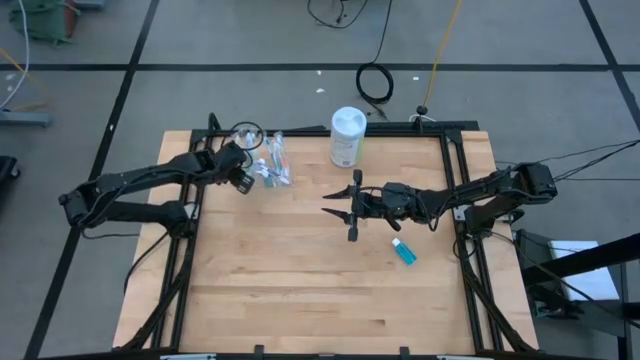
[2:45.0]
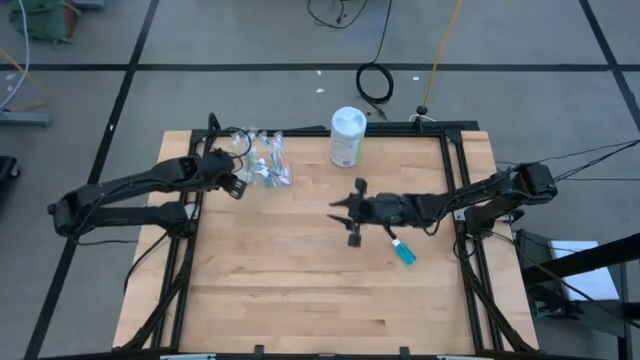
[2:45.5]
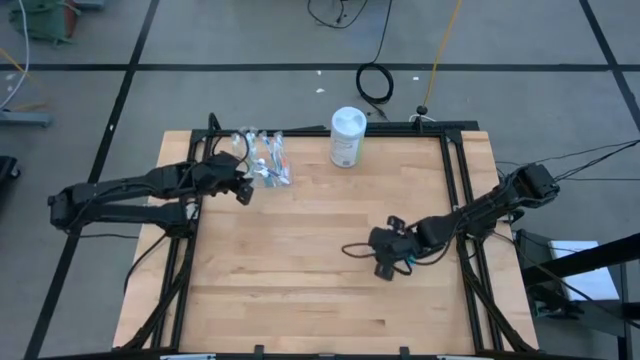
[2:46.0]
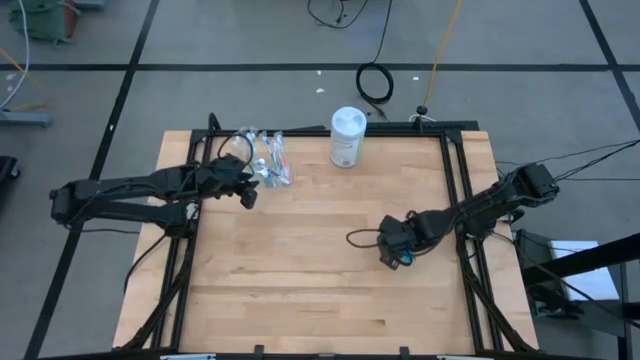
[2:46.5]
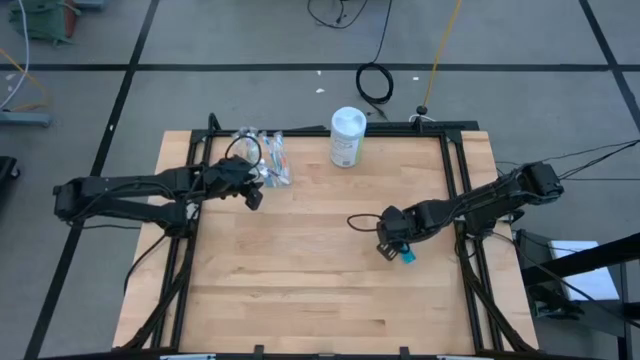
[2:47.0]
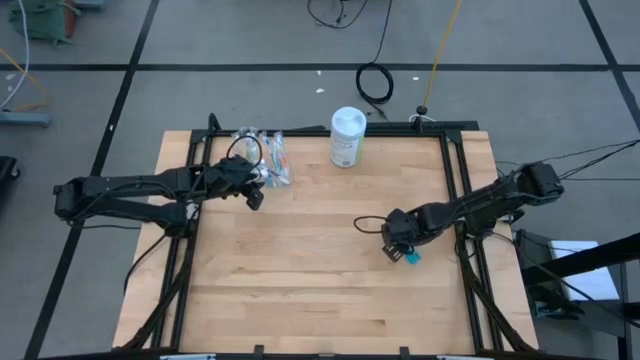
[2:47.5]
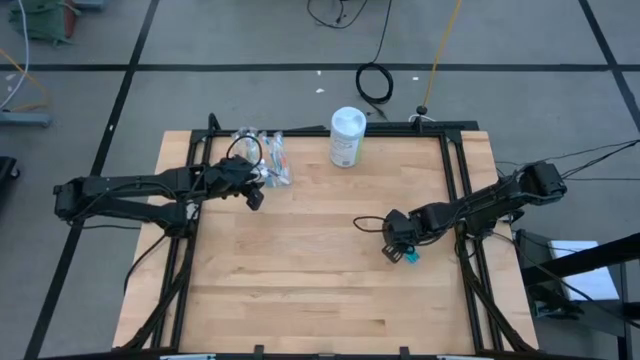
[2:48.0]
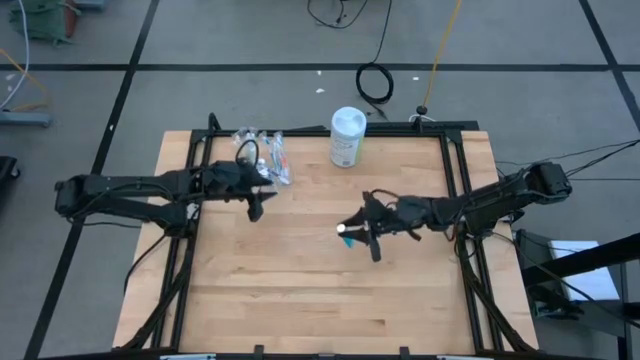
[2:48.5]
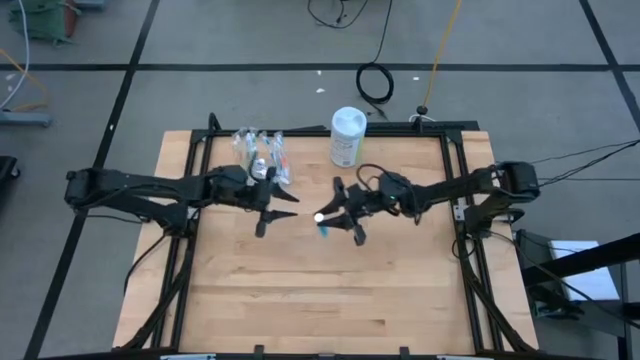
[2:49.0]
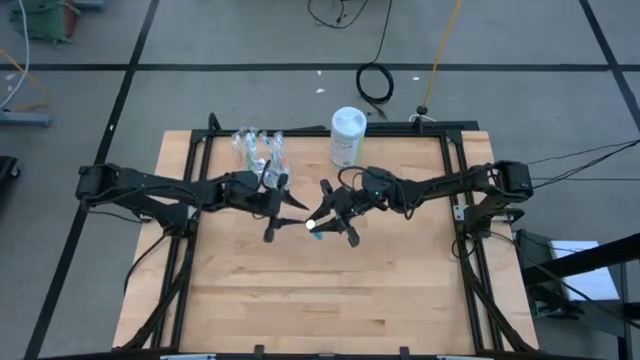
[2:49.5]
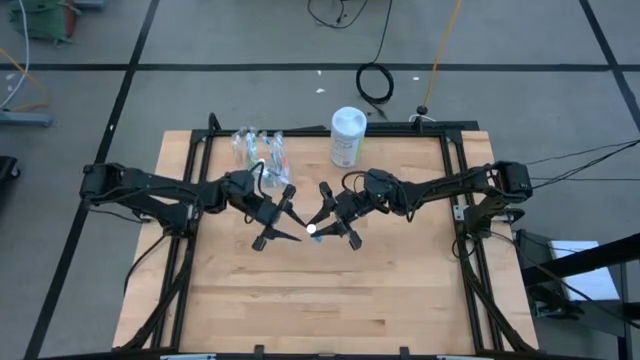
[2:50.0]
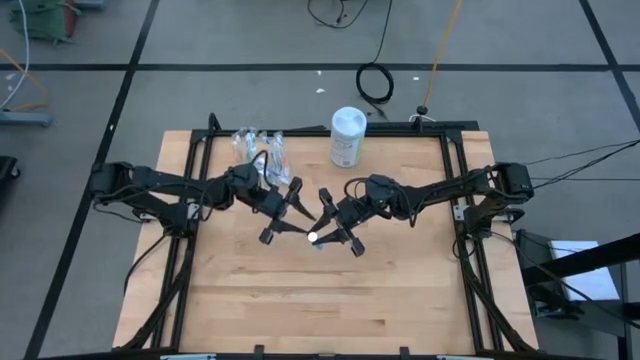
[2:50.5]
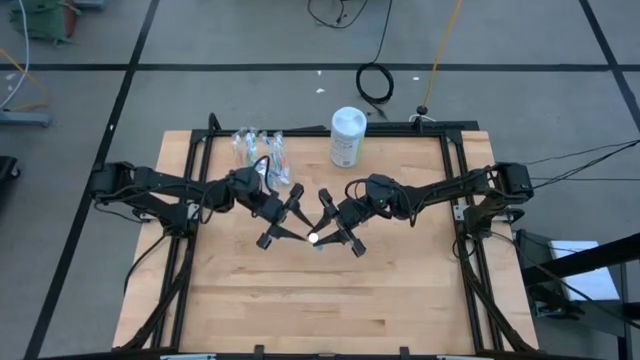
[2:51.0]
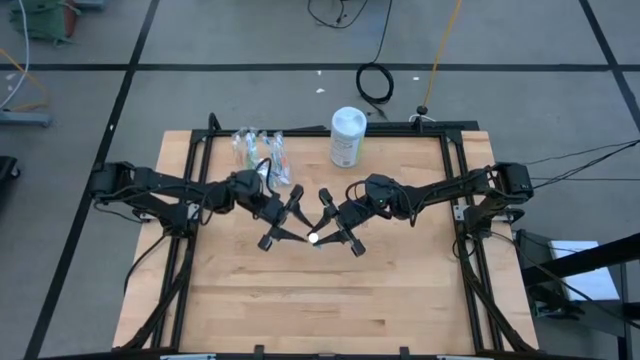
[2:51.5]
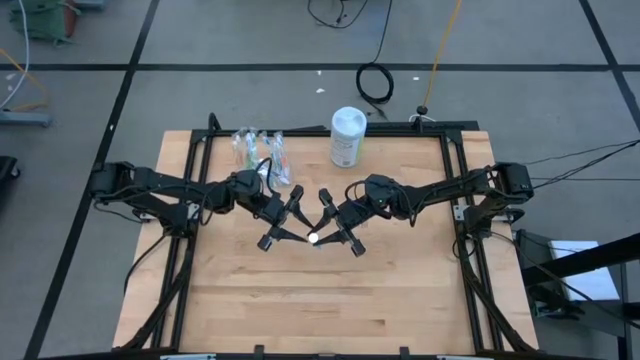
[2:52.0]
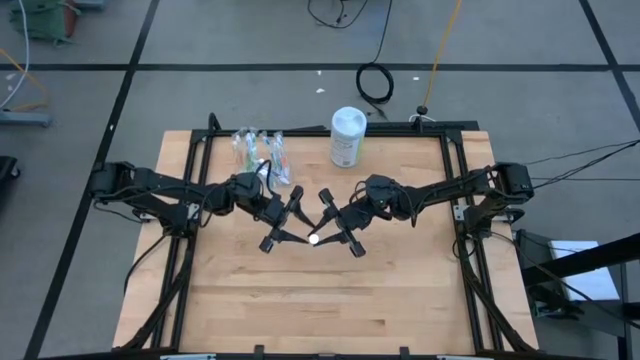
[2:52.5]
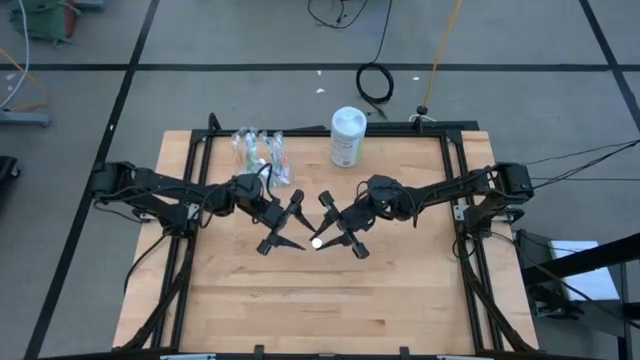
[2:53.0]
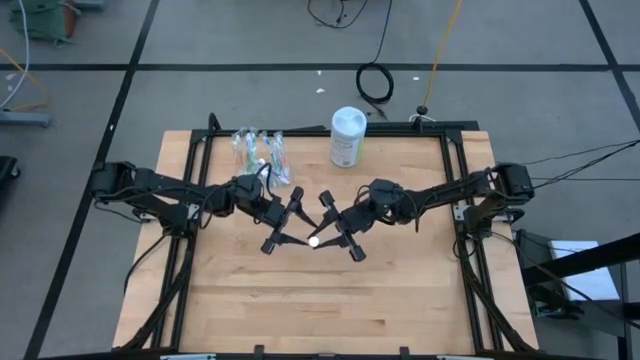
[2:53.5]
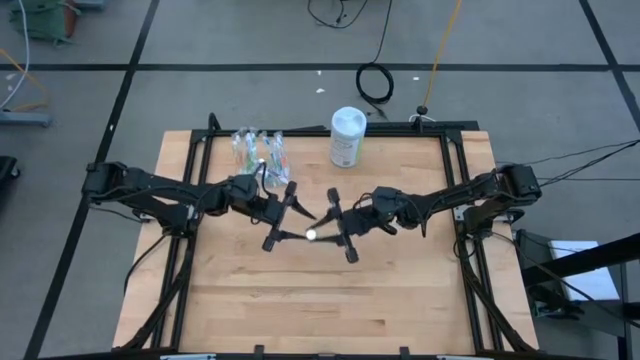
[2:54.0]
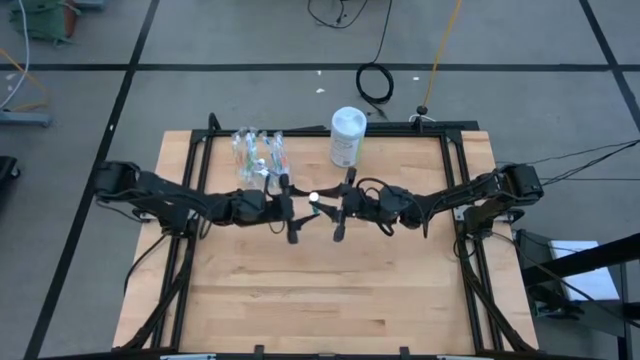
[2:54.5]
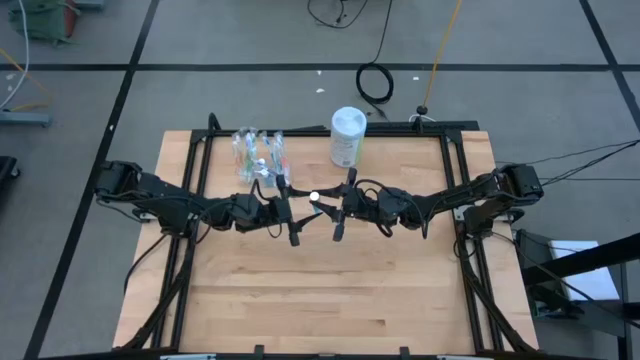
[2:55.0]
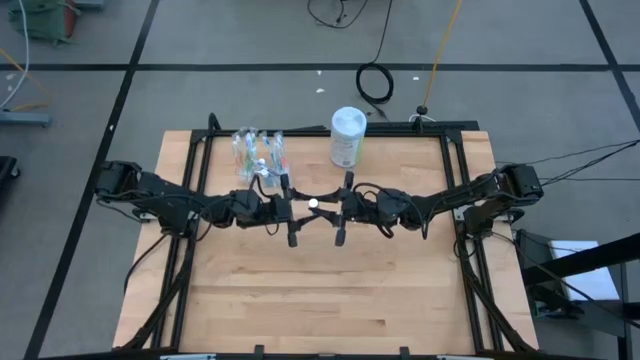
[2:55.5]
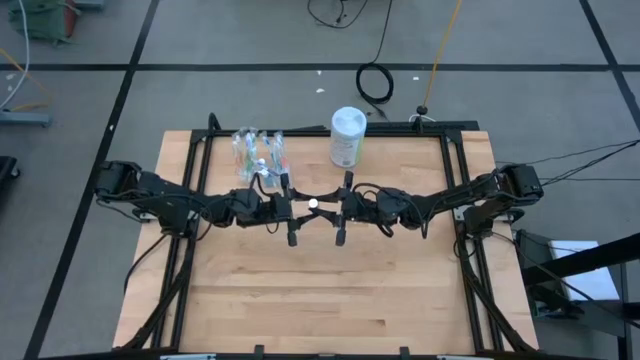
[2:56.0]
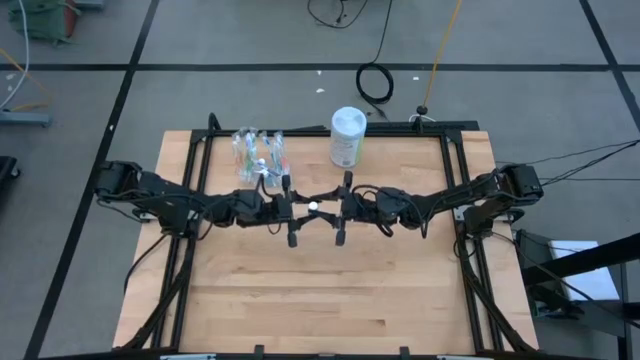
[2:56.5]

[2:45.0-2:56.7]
Task: Pick & Place toothbrushing station
Put the mouthwash into the middle of the transparent organizer

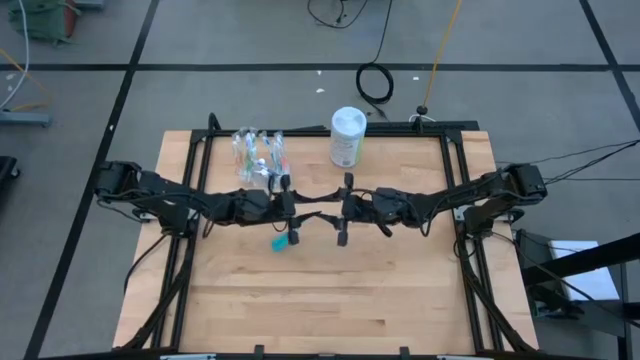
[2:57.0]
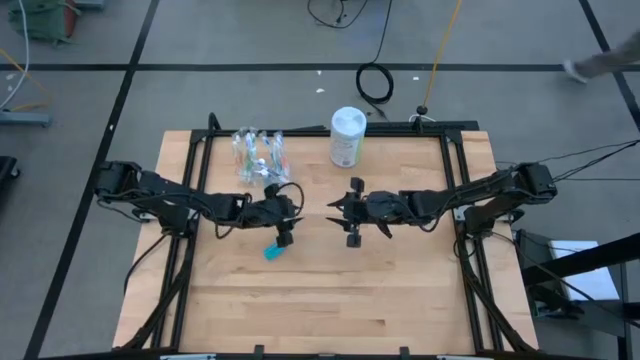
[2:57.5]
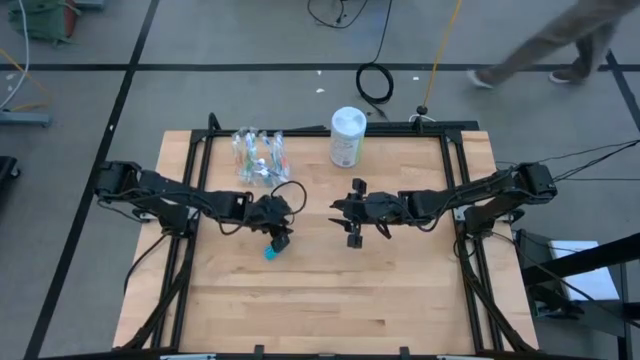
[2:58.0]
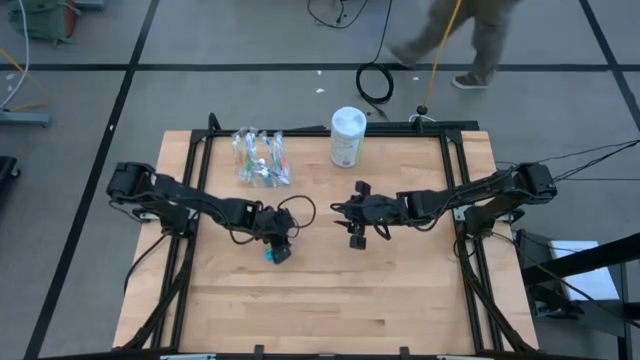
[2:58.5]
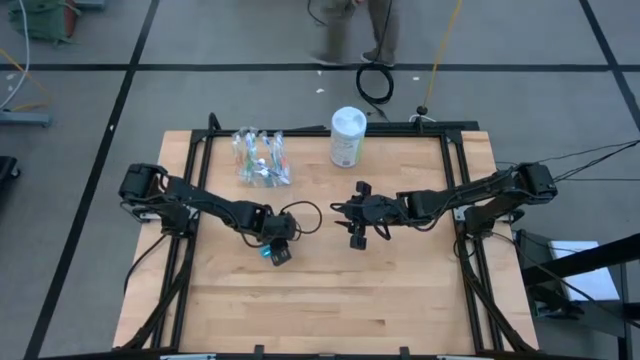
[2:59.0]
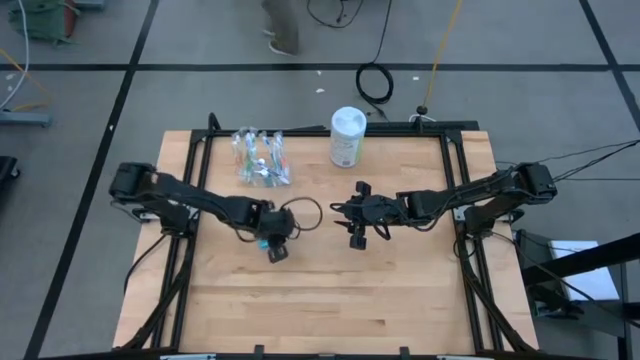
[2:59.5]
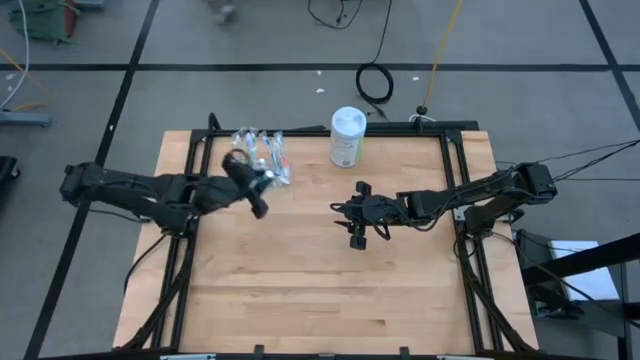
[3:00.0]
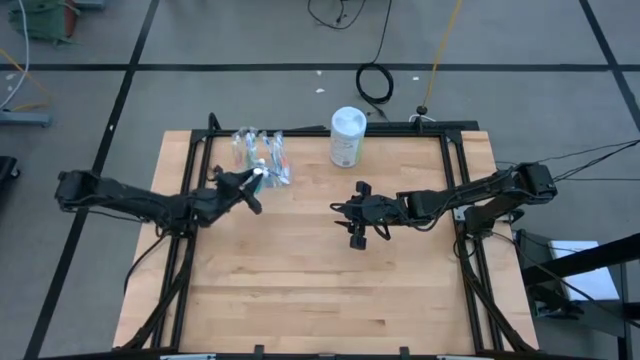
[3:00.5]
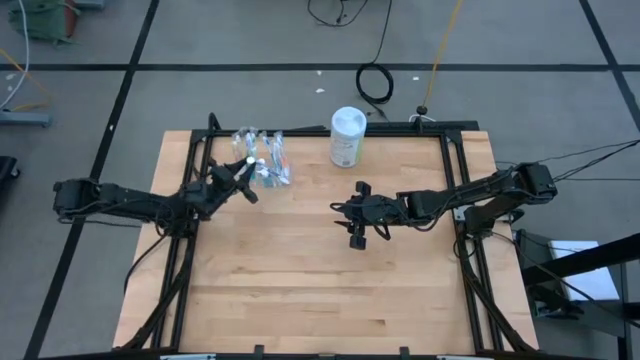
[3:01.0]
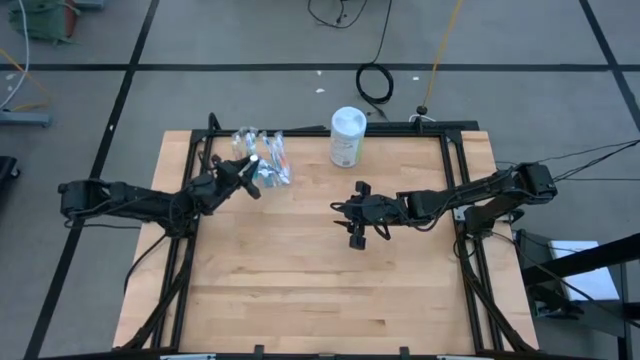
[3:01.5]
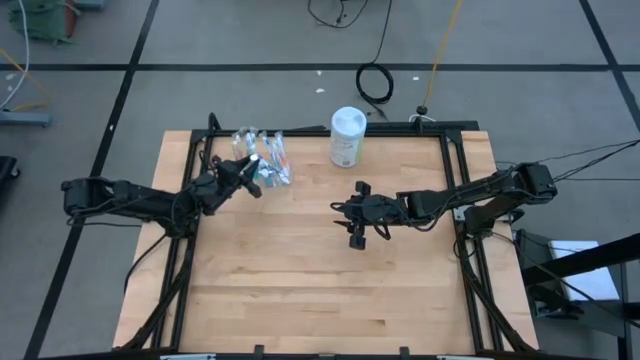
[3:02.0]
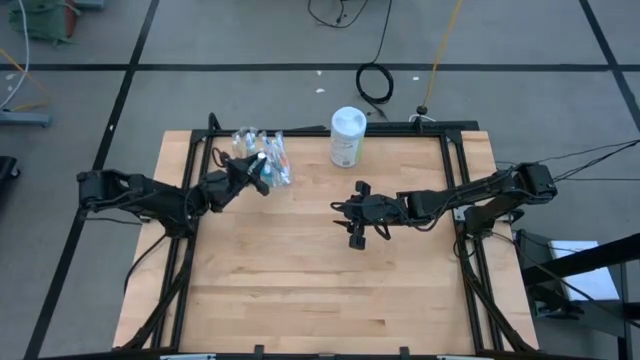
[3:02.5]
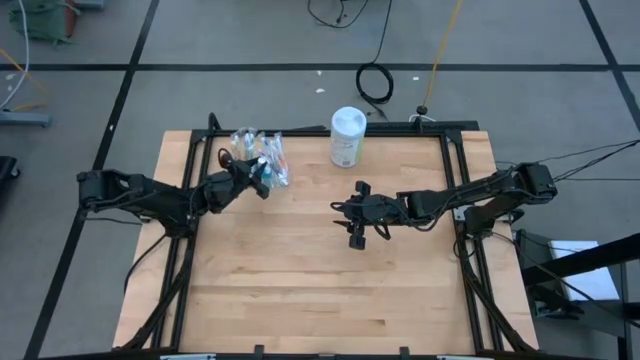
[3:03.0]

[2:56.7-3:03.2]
Put the mouthwash into the middle of the transparent organizer

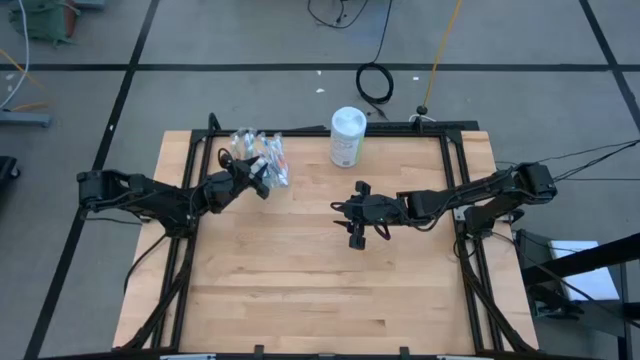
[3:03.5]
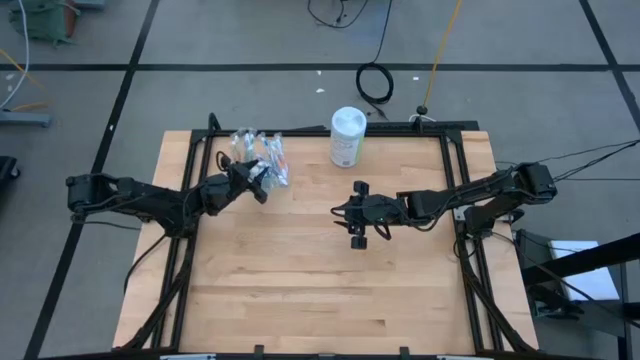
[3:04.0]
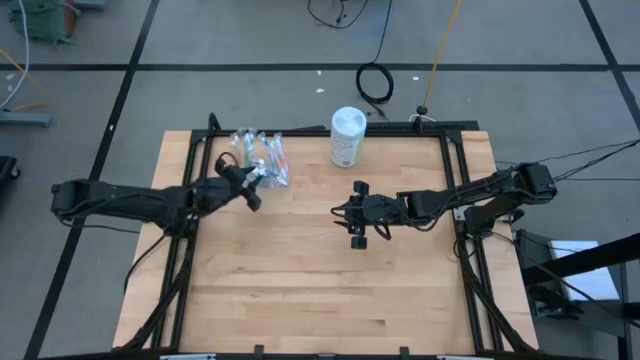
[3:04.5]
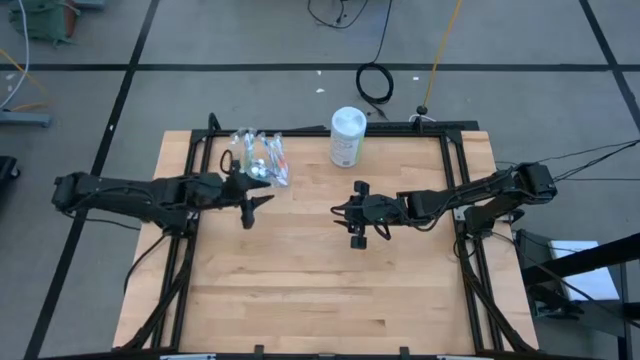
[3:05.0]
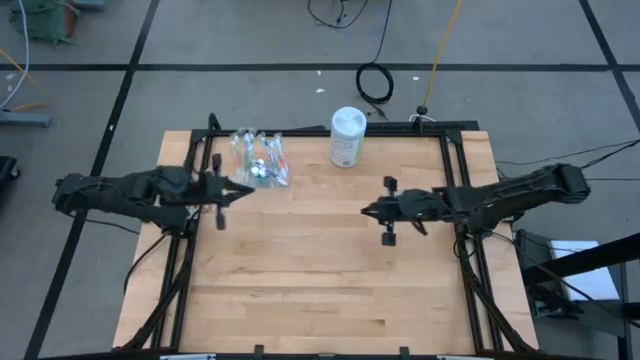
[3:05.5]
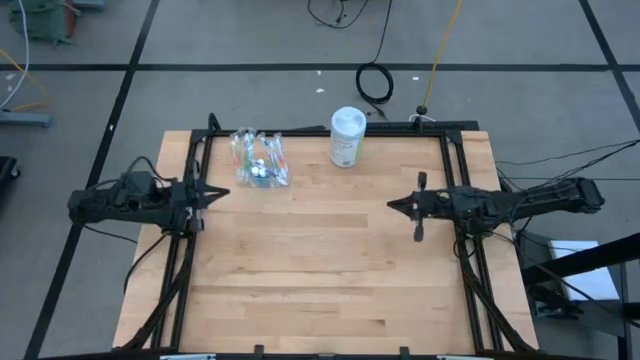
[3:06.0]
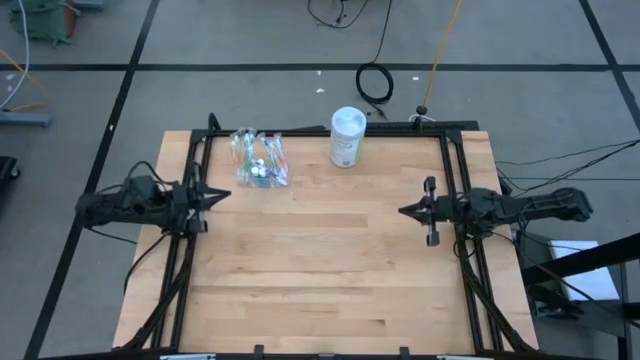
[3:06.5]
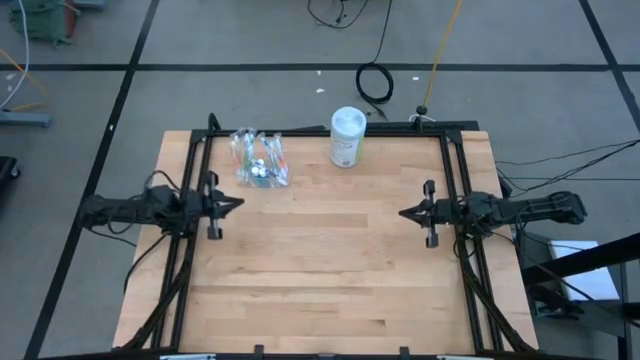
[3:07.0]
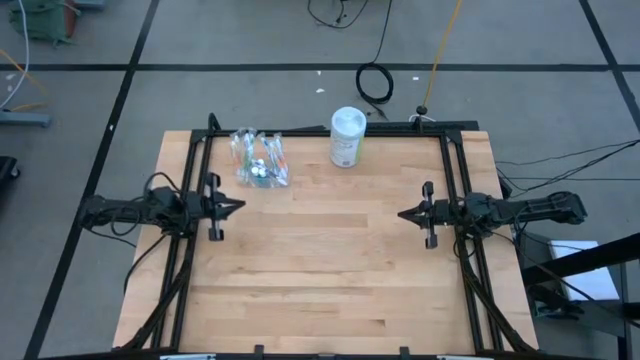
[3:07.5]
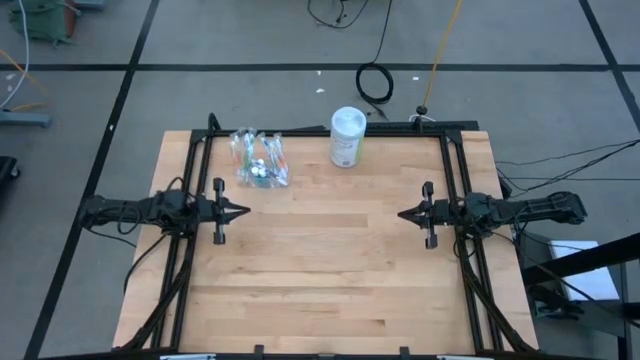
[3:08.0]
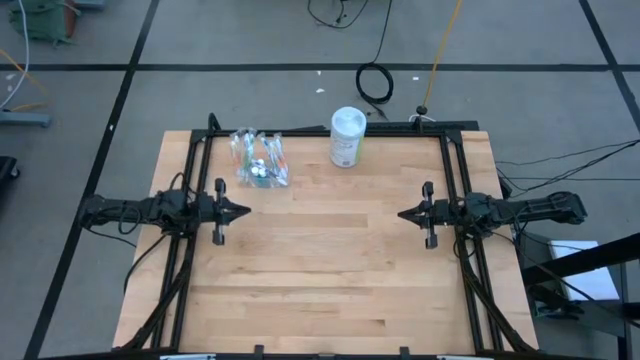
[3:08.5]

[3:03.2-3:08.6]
Return to Home Position
